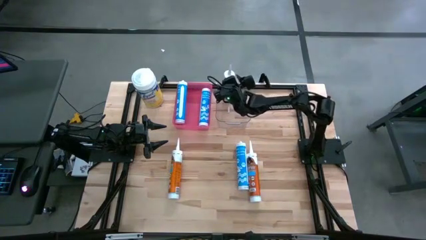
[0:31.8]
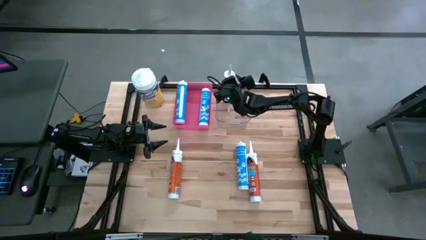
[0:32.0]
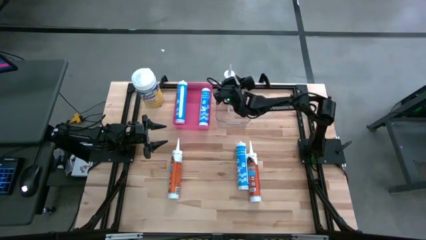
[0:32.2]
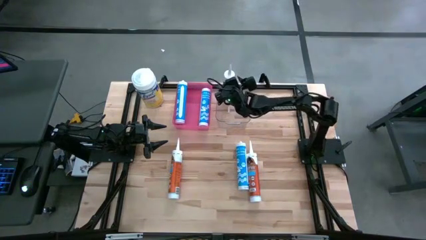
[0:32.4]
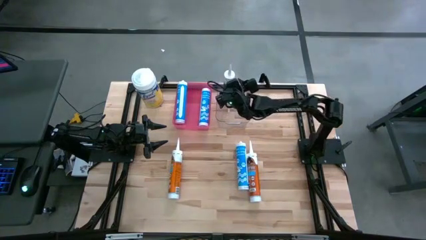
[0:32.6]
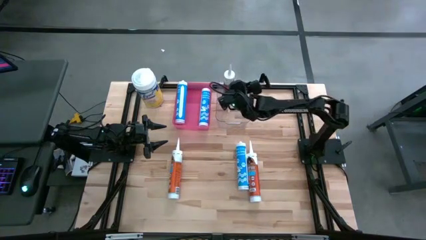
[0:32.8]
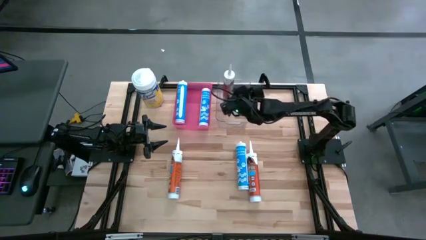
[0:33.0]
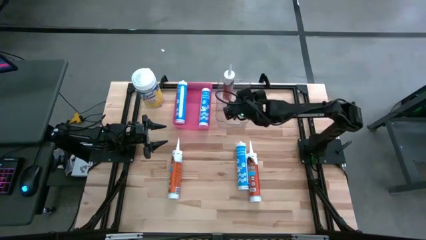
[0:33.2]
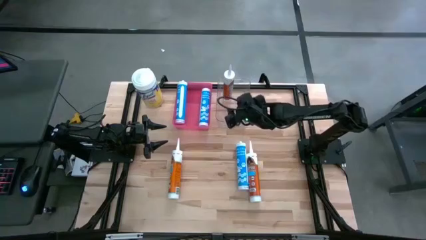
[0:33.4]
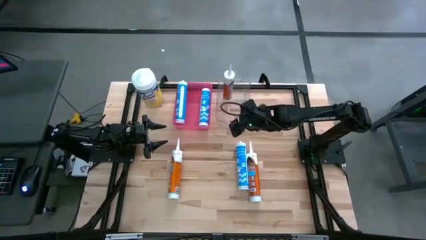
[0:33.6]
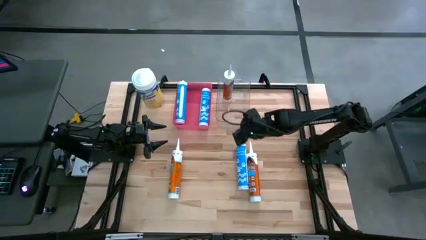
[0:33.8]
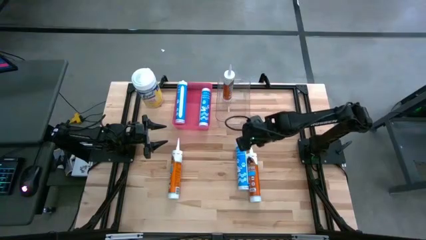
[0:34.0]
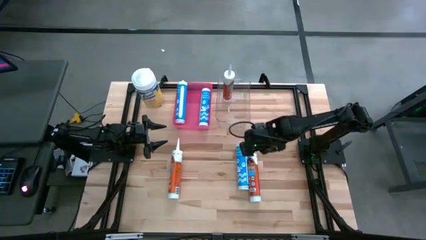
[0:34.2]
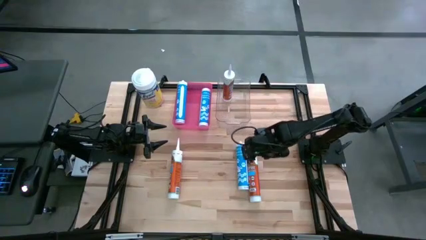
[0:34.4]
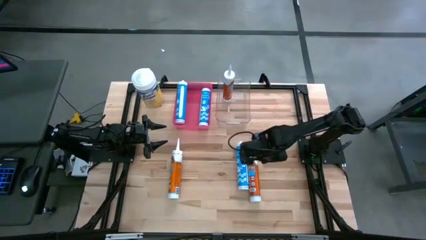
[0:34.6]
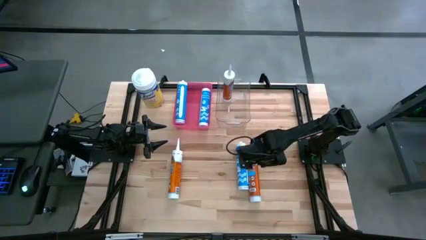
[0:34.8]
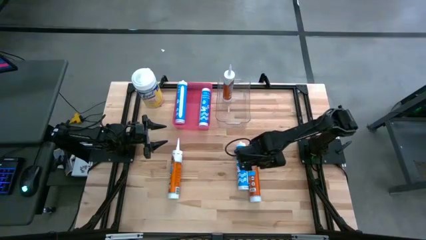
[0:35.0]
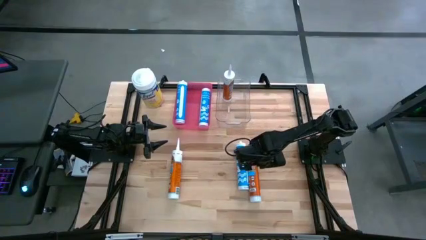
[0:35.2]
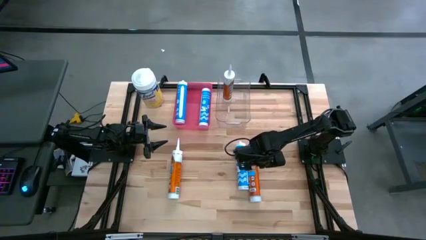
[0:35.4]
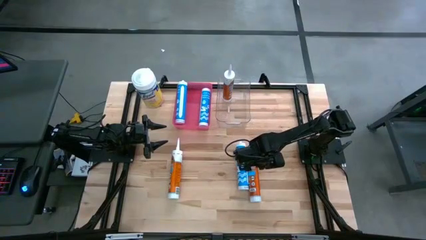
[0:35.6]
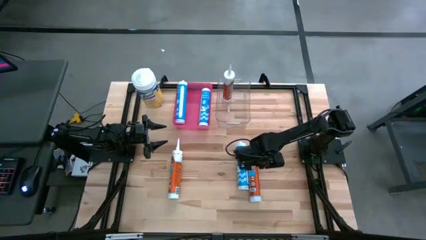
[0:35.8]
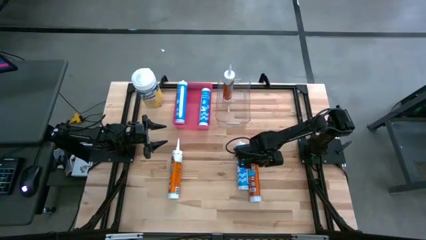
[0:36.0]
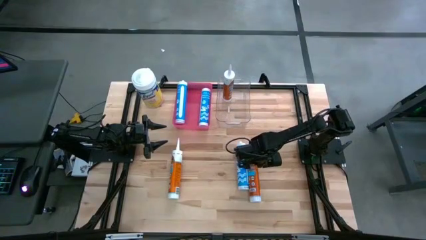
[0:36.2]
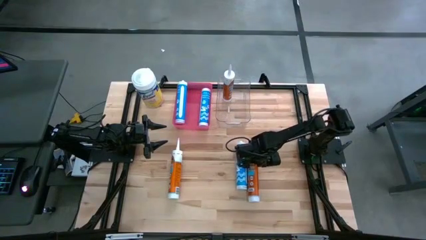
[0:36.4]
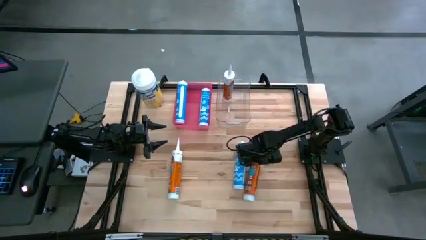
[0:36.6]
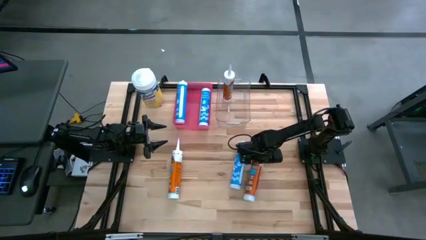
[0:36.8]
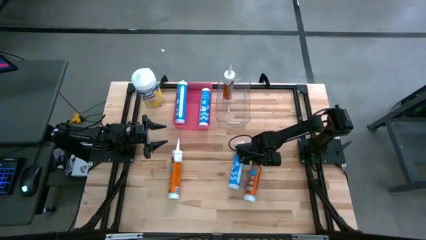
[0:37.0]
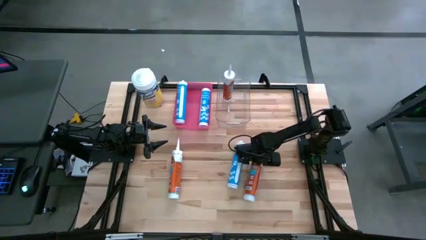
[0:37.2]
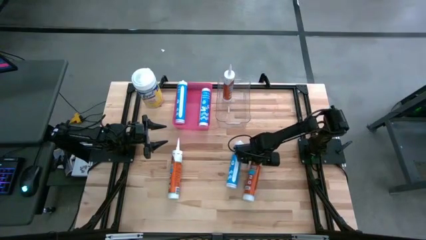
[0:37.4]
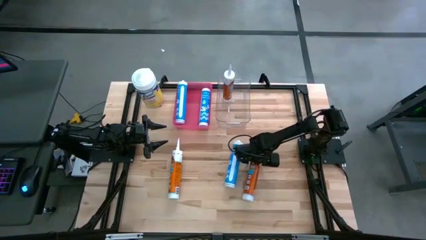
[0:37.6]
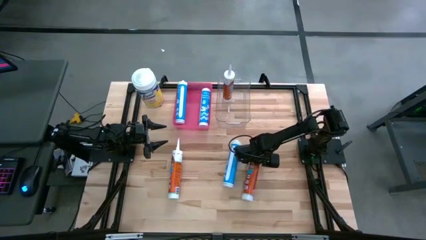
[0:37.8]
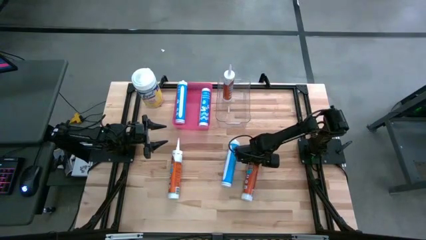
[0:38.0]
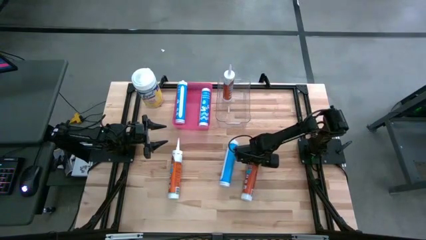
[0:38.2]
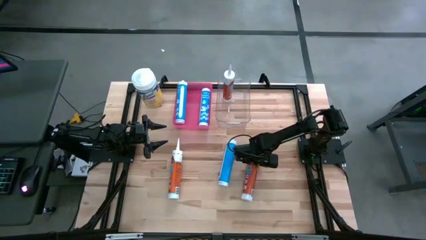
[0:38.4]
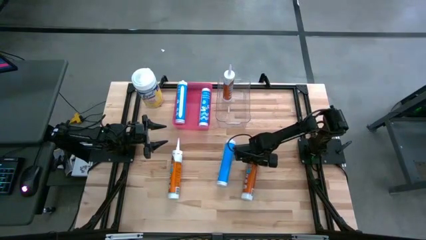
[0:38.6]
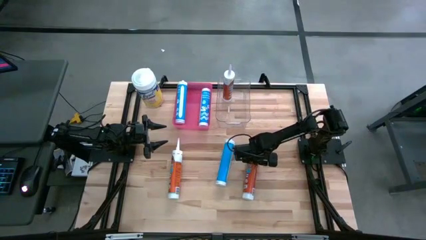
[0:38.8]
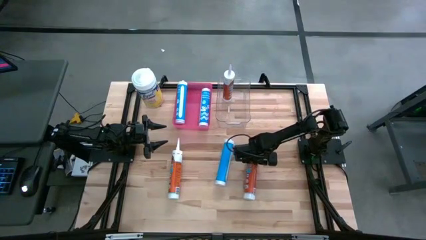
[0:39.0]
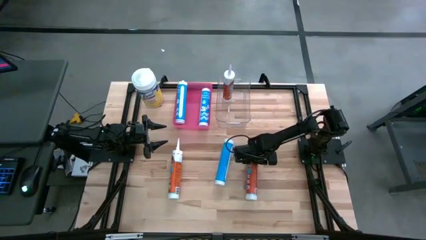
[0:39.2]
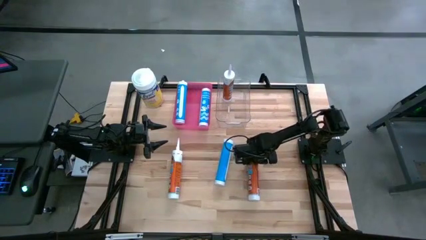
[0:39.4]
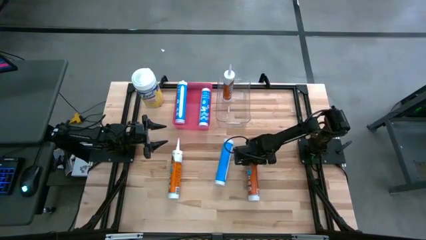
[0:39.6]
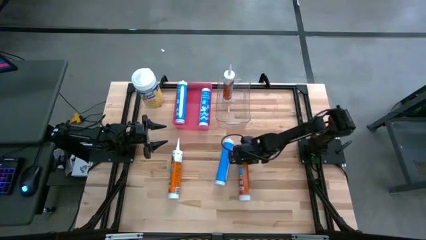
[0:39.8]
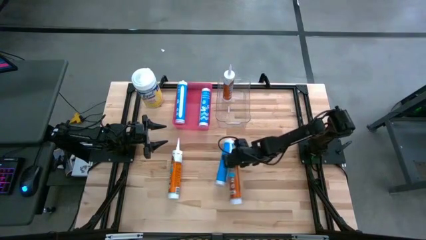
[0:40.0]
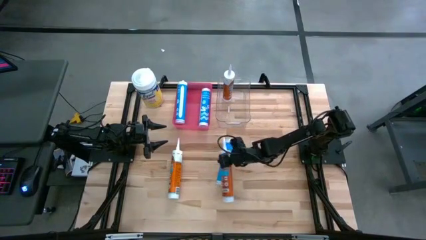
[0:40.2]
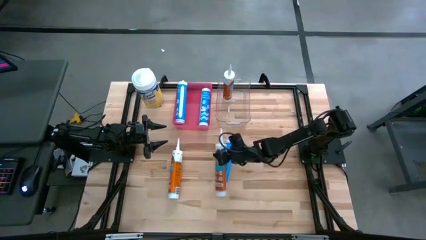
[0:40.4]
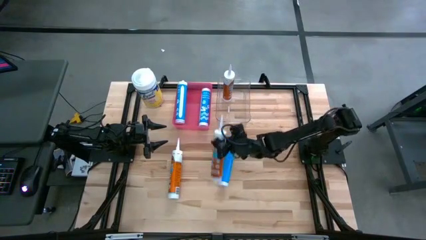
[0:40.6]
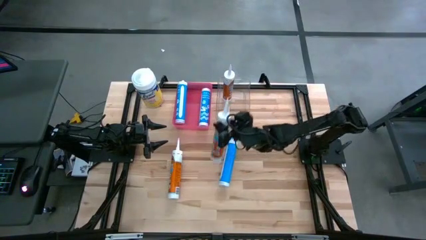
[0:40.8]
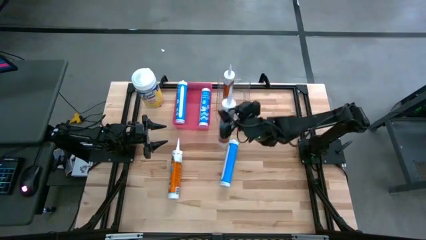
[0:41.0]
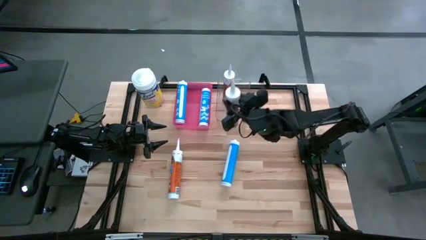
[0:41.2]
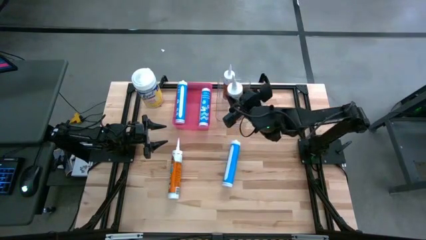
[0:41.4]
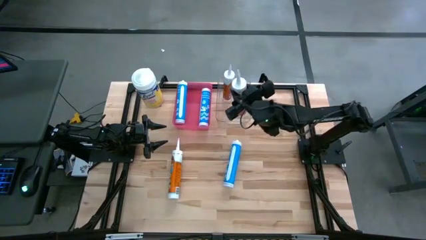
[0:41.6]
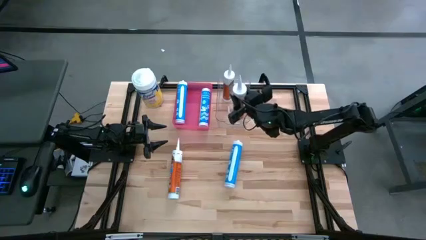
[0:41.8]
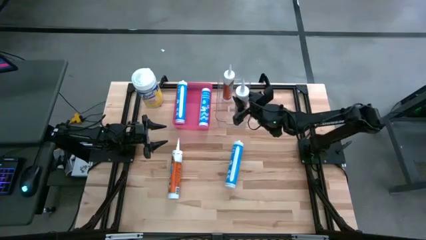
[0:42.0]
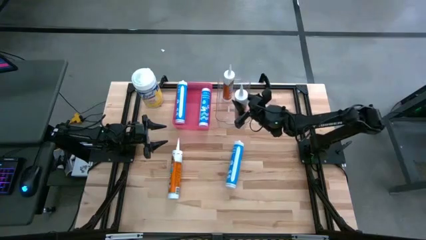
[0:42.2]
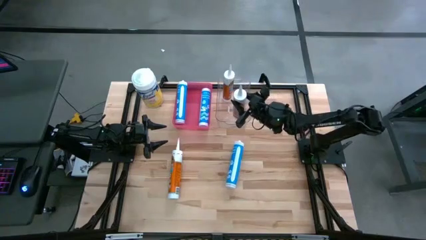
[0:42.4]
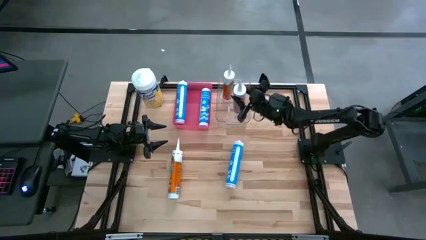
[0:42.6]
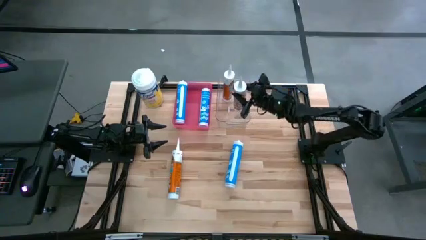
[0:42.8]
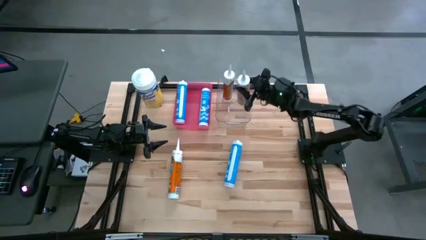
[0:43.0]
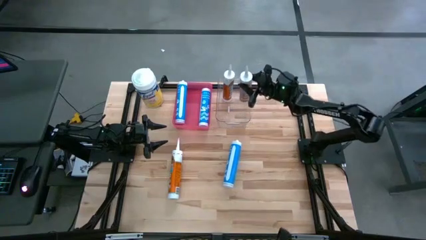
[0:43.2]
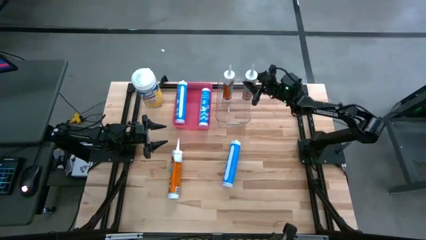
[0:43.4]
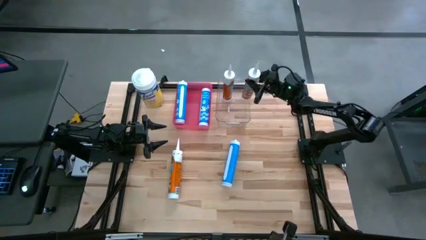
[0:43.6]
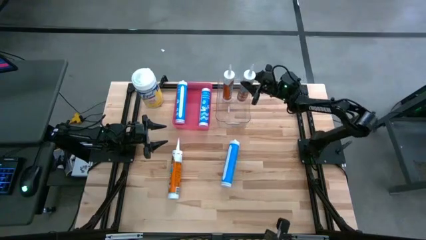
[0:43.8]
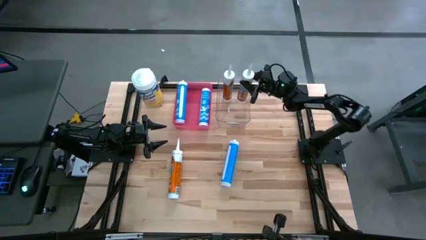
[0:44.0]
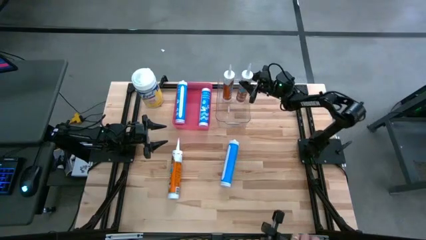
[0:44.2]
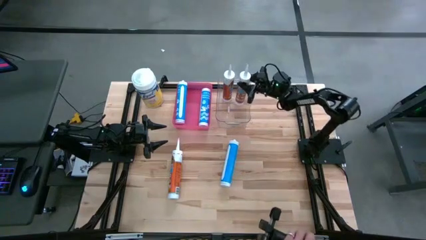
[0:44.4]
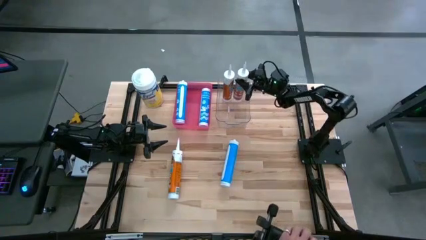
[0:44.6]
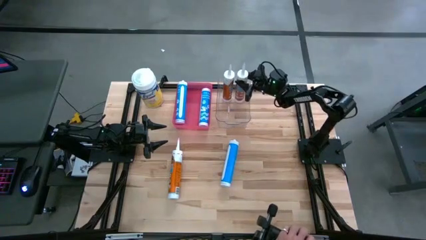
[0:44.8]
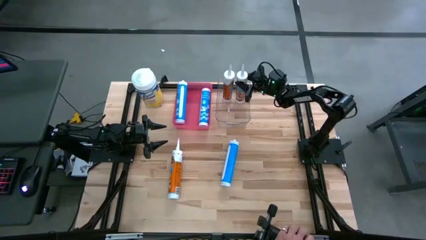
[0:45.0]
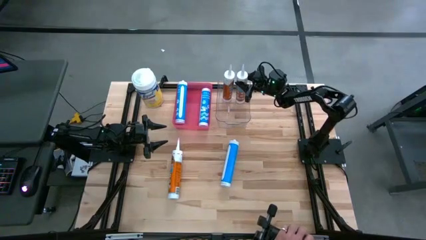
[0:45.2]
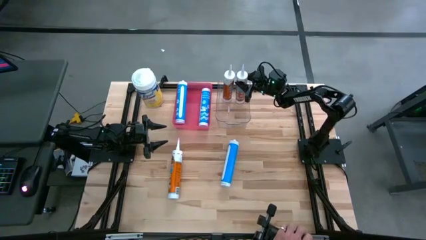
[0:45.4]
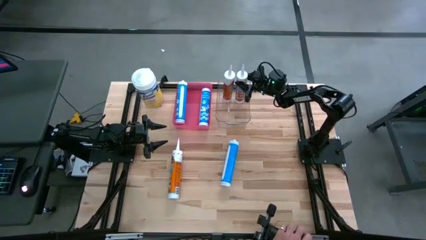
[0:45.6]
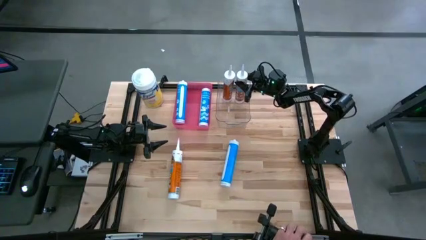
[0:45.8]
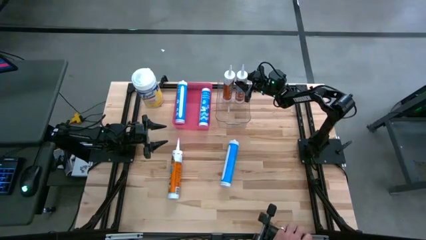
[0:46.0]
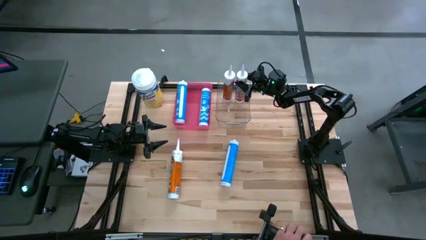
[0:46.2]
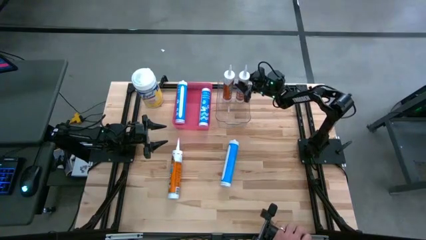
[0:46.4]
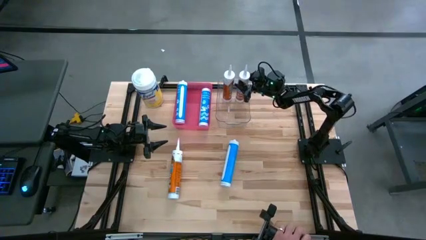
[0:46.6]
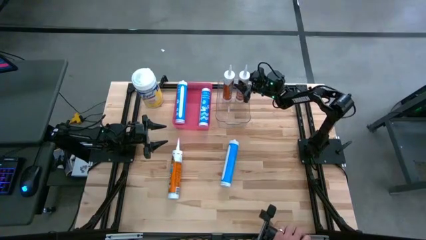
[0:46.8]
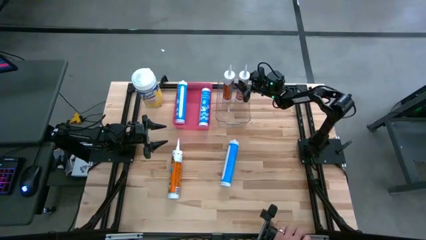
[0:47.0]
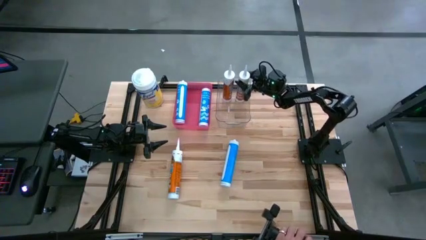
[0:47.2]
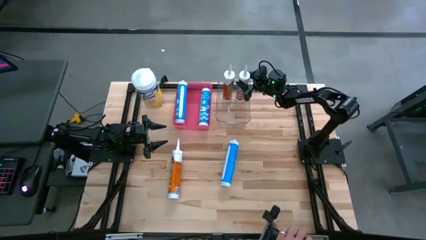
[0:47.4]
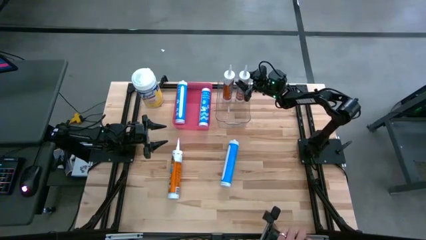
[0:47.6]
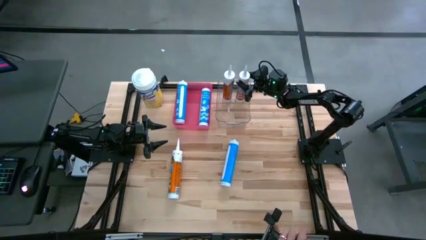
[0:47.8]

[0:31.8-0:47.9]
Task: Sort silicone sealant tubes
Put the orange silicone sealant into the transparent bin
